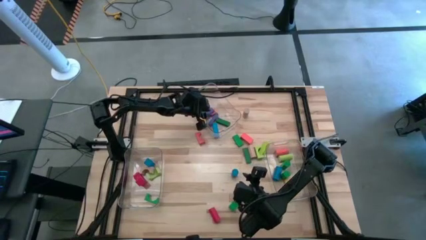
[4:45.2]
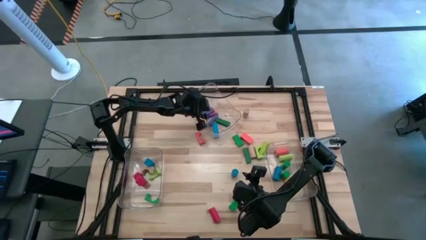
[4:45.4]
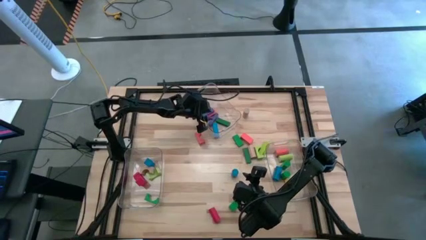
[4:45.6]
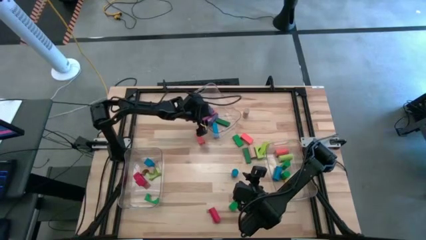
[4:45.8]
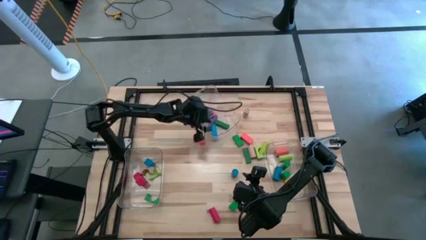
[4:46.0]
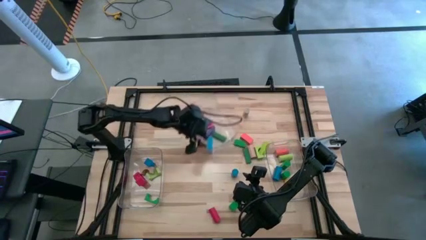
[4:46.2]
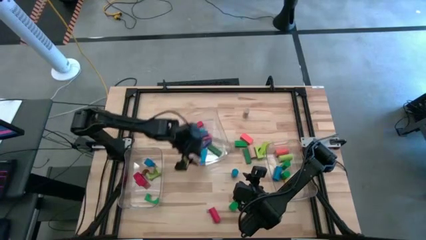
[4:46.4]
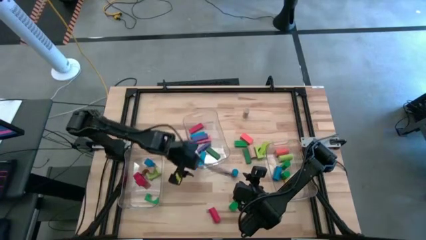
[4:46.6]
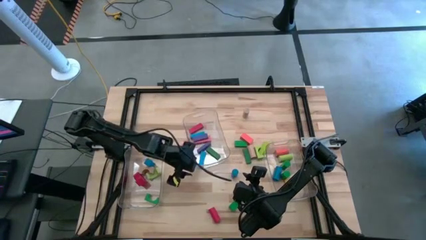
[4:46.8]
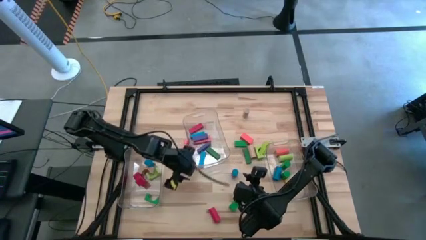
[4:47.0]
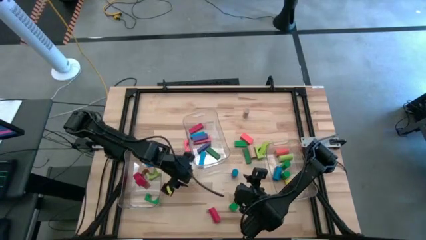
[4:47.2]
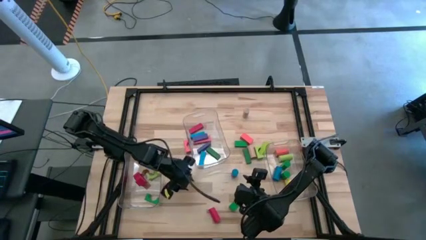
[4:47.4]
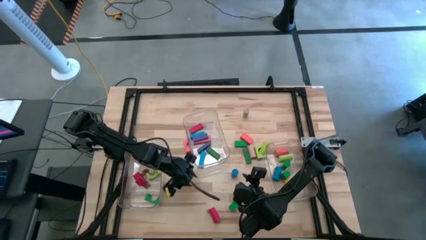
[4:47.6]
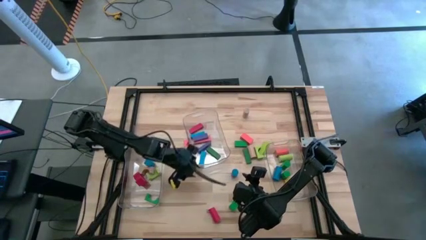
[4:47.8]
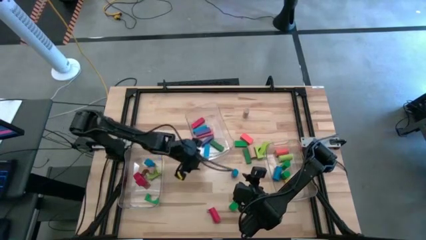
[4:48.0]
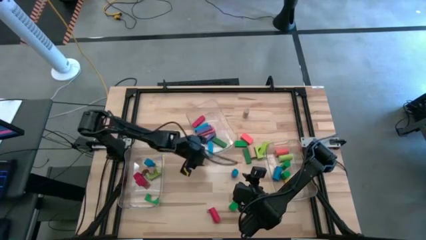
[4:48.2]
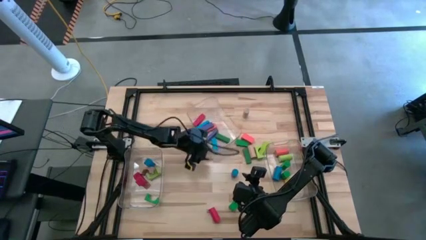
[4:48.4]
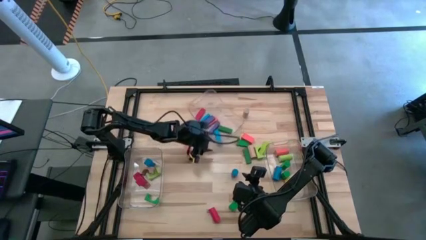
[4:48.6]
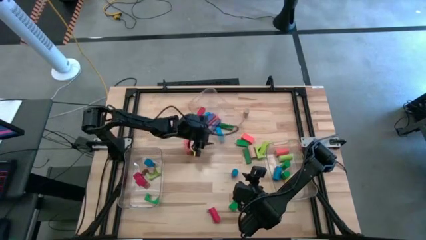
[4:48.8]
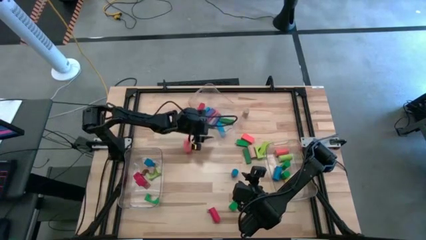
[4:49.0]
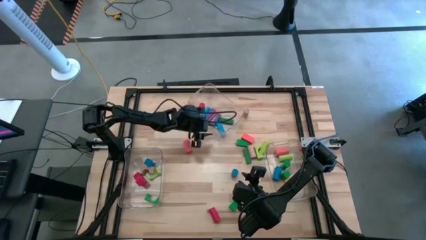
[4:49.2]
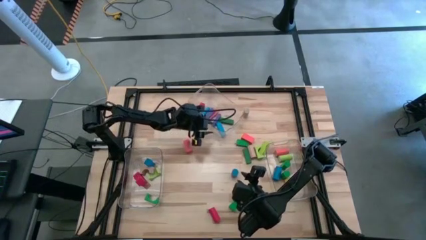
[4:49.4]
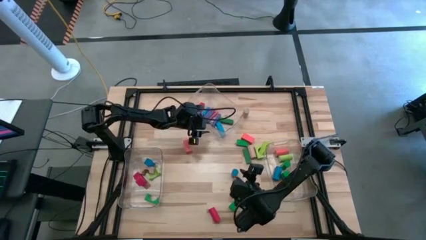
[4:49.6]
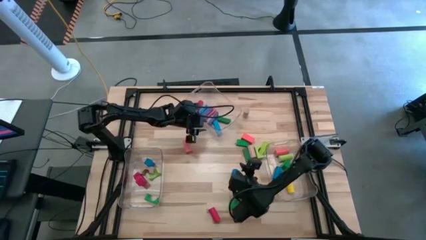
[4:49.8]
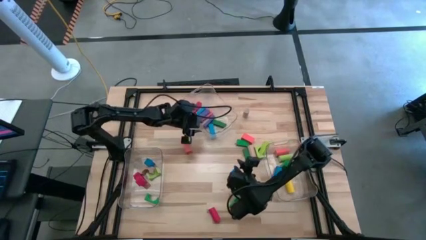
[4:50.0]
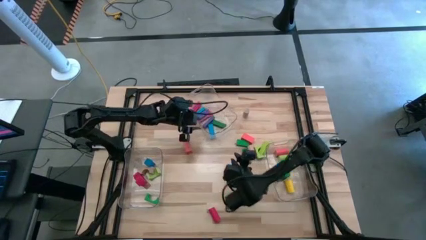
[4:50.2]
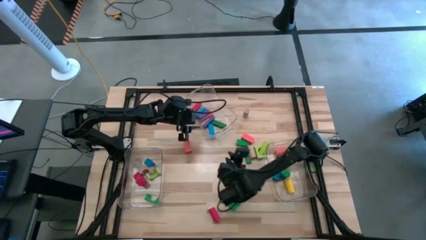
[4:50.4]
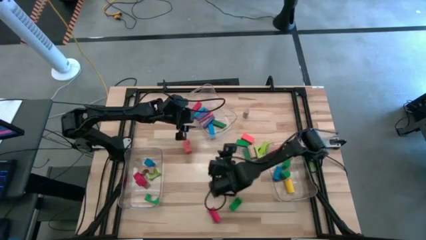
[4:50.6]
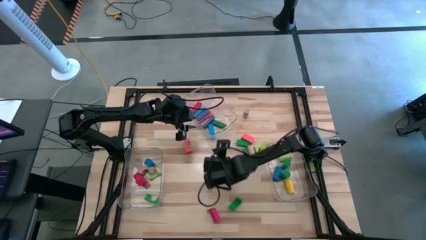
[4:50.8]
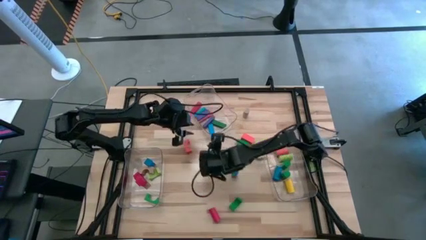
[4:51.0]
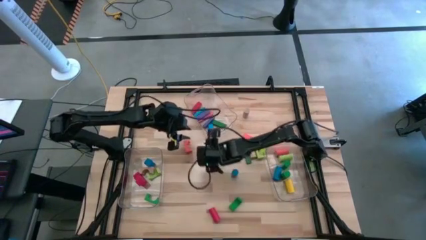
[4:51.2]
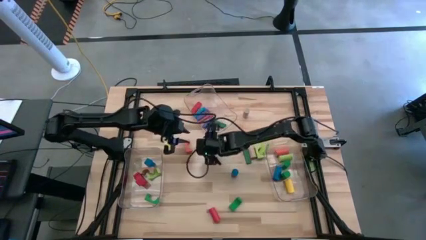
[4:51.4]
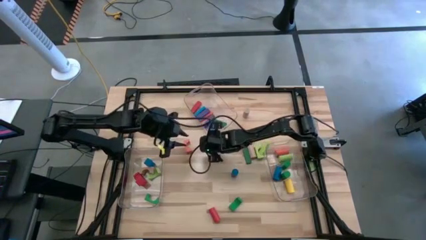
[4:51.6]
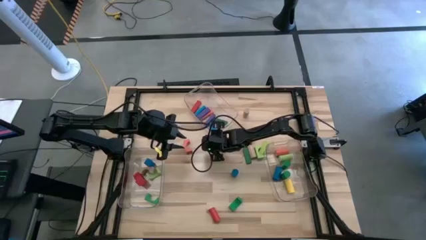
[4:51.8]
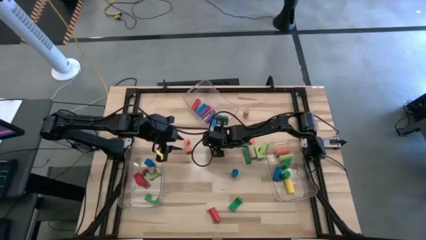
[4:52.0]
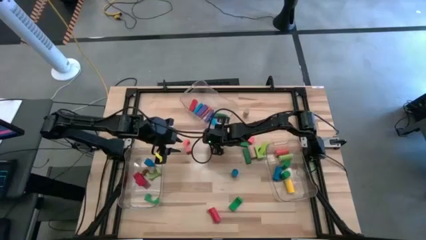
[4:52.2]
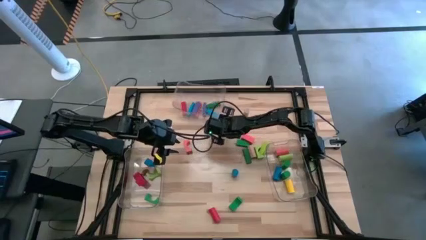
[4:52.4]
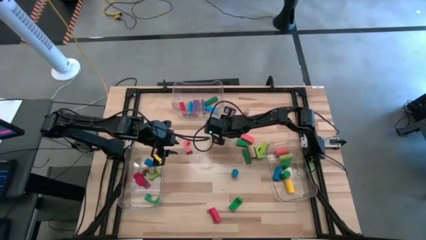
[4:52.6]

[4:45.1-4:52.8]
Task: Sort blocks by size
Adjust the top transparent bin
